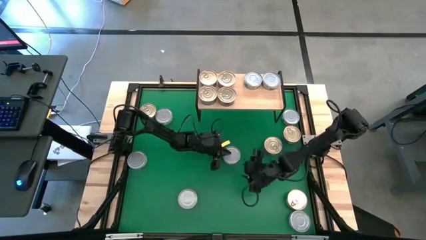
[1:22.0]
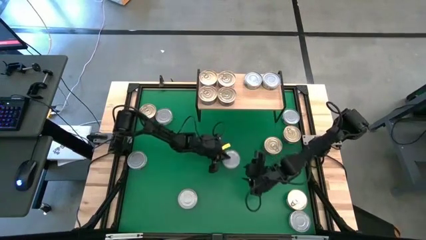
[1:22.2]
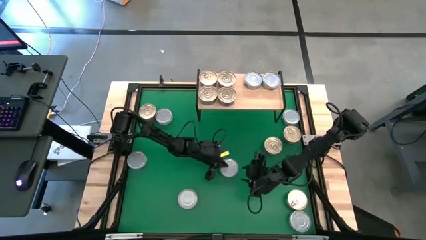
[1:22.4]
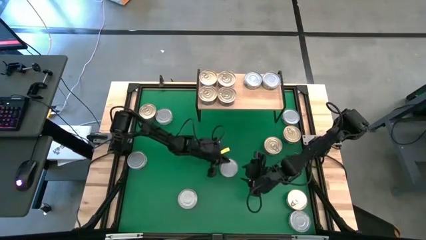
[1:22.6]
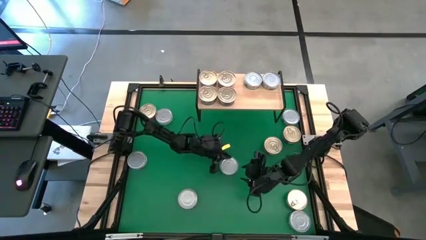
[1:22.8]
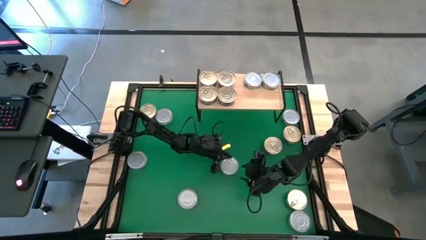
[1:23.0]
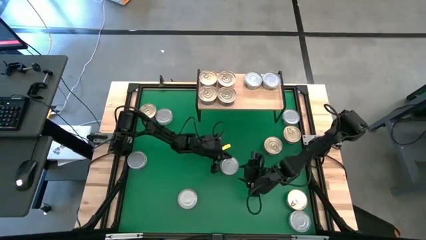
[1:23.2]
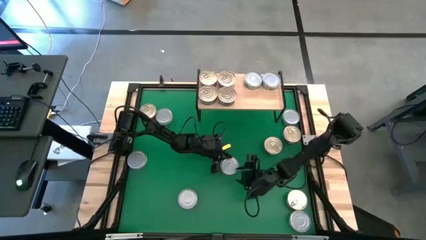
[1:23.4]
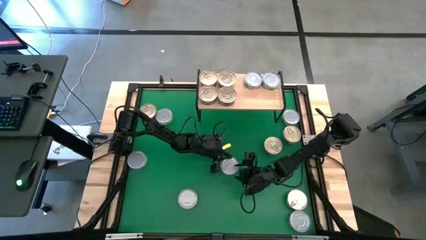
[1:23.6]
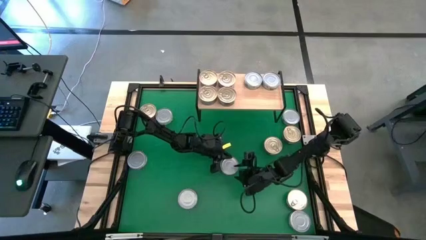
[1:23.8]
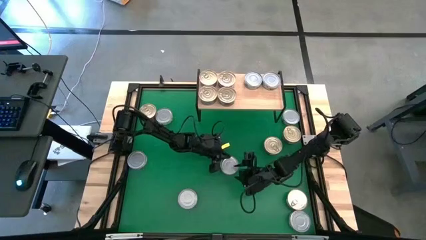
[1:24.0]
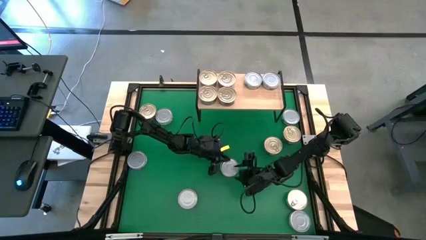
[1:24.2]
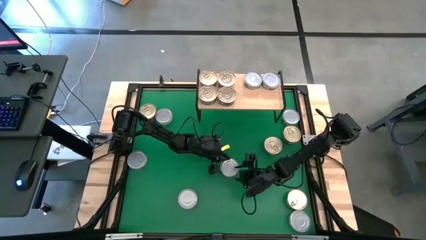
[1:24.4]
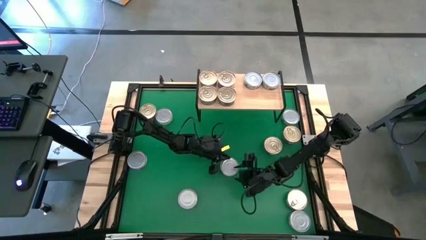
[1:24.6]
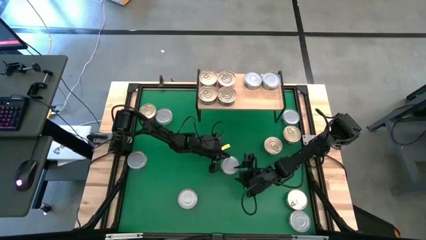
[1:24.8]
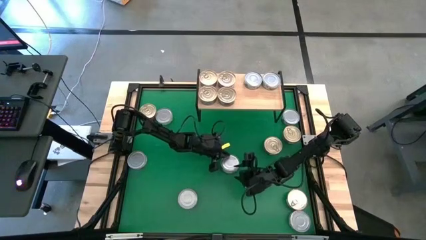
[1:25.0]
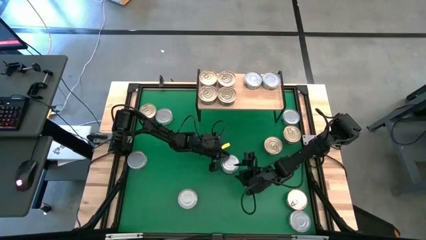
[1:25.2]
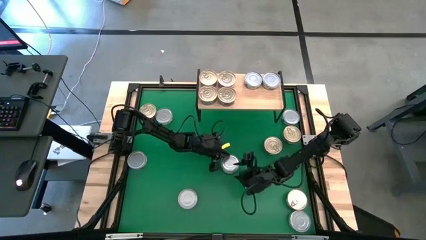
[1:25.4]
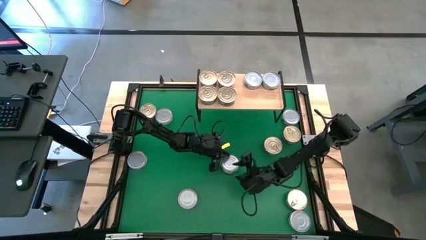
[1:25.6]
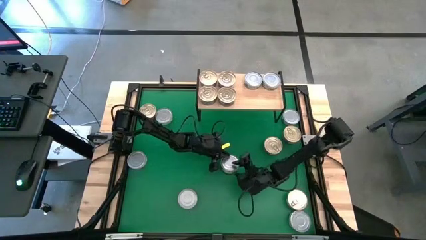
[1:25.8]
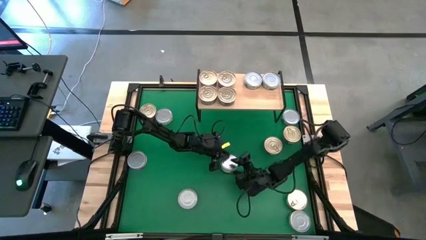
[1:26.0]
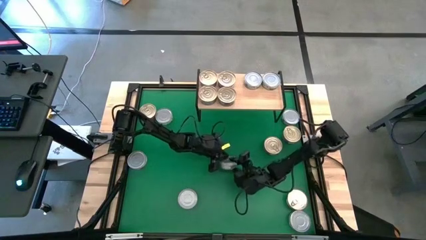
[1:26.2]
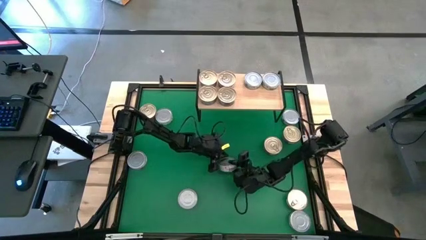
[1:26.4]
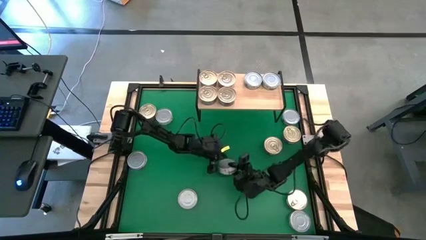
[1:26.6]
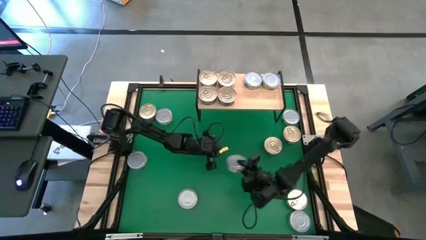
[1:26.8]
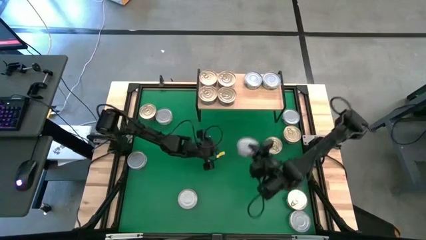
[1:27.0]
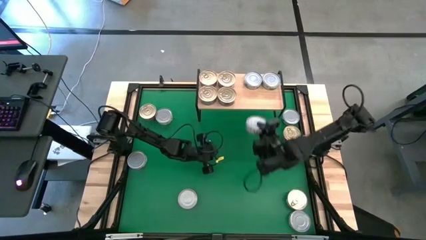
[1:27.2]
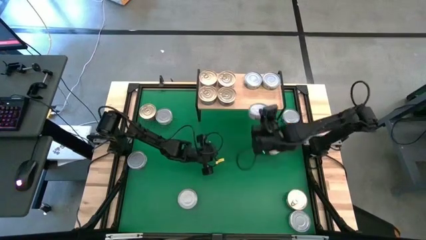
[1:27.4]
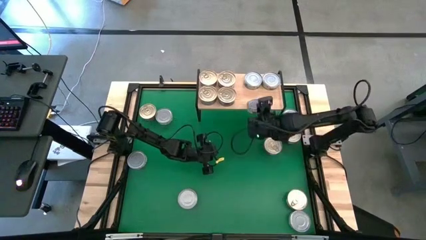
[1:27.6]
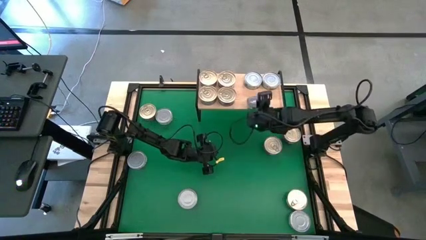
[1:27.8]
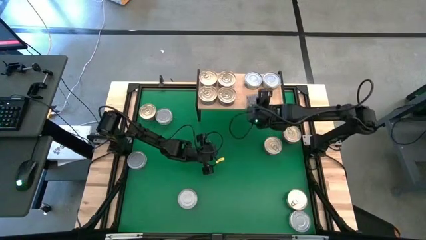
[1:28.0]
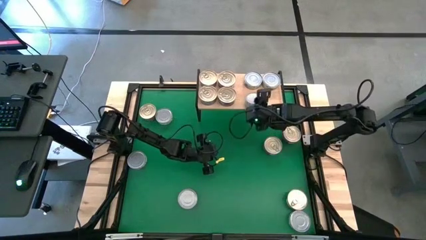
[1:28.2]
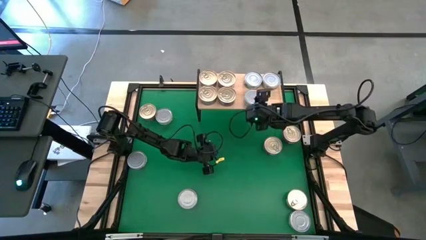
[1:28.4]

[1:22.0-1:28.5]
Task: Stack canned seafood by type on shelf
Put the green tuna can on the shelf

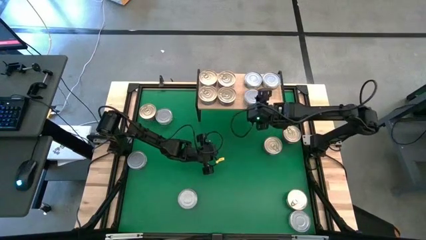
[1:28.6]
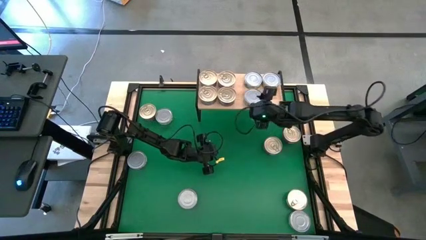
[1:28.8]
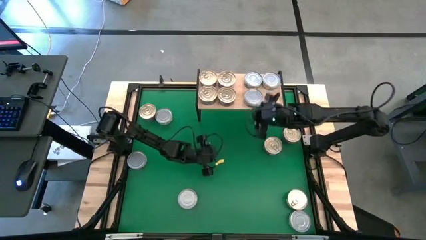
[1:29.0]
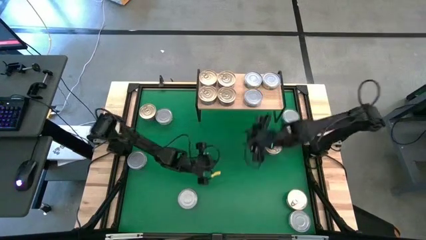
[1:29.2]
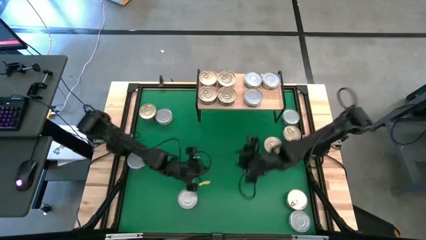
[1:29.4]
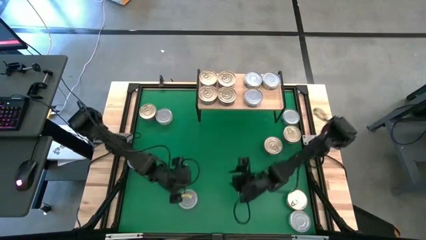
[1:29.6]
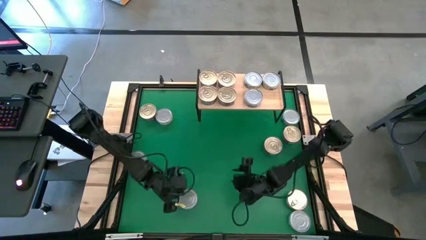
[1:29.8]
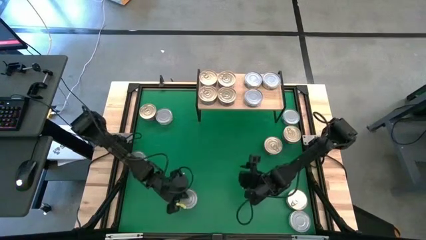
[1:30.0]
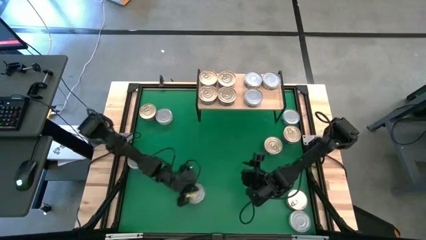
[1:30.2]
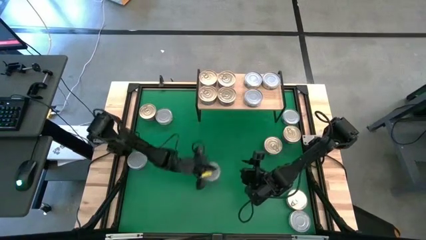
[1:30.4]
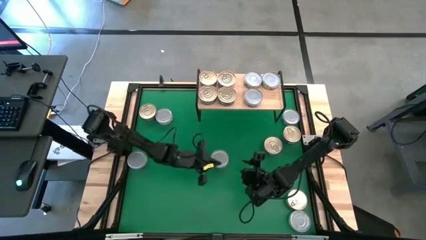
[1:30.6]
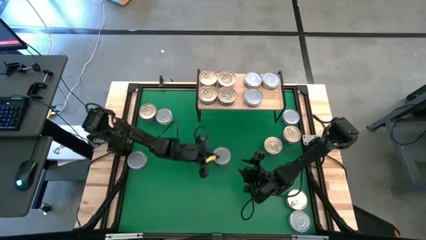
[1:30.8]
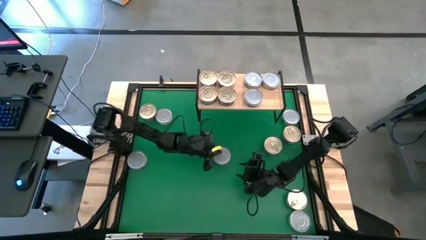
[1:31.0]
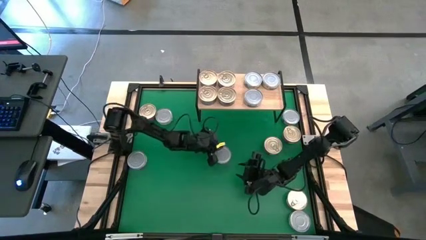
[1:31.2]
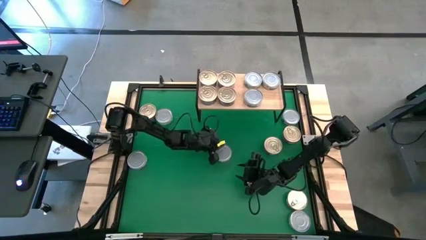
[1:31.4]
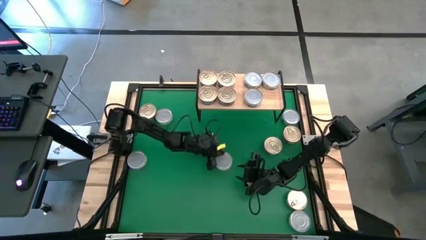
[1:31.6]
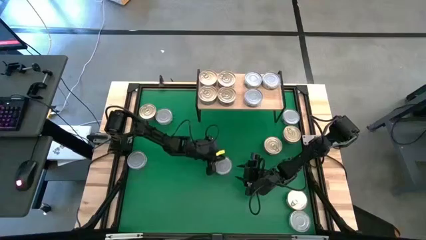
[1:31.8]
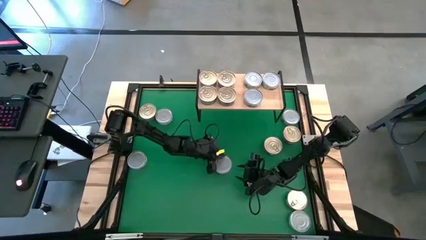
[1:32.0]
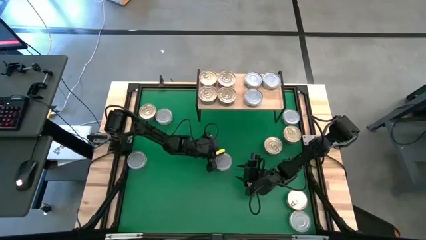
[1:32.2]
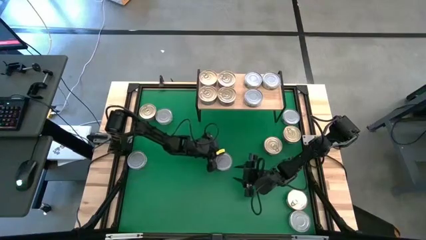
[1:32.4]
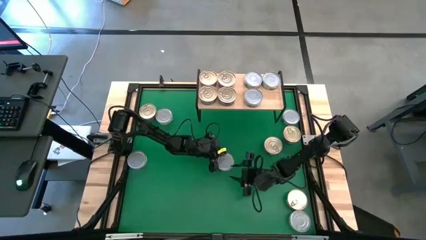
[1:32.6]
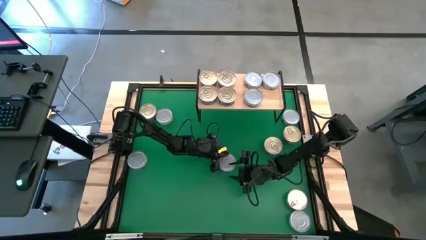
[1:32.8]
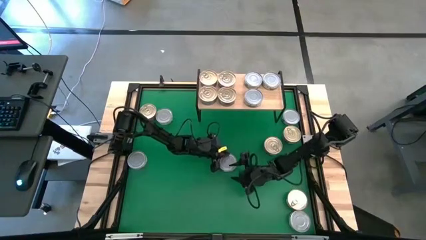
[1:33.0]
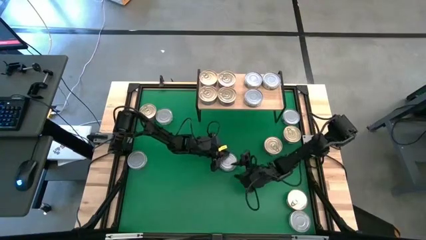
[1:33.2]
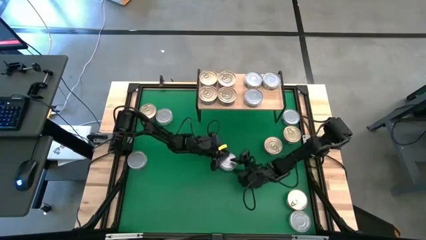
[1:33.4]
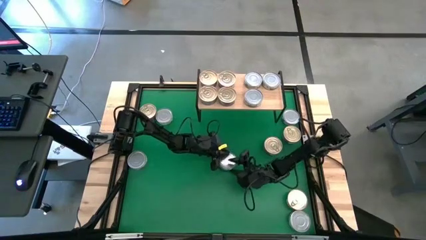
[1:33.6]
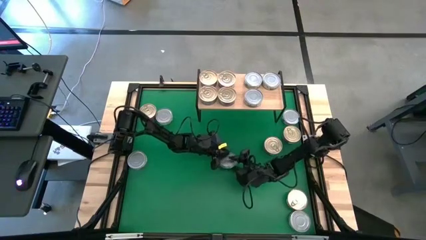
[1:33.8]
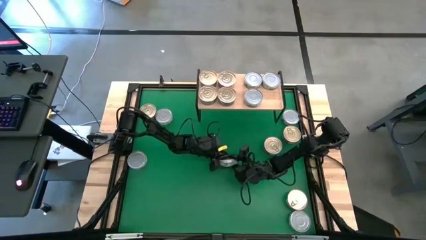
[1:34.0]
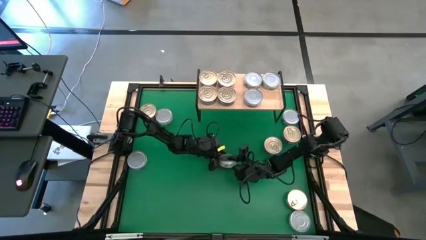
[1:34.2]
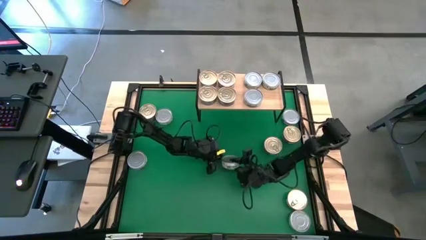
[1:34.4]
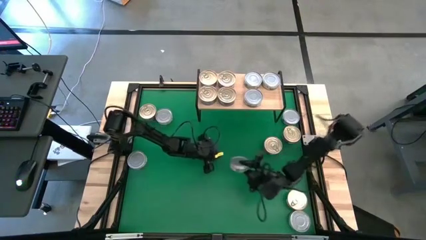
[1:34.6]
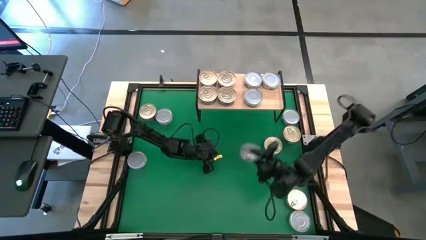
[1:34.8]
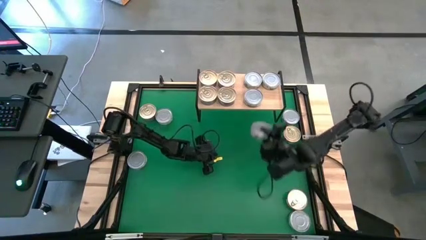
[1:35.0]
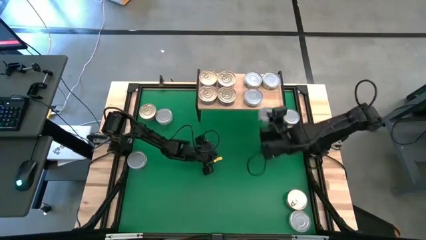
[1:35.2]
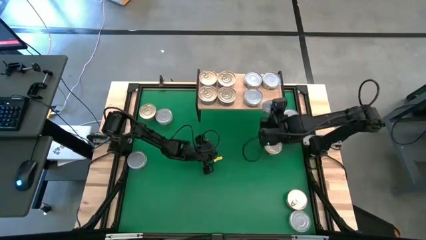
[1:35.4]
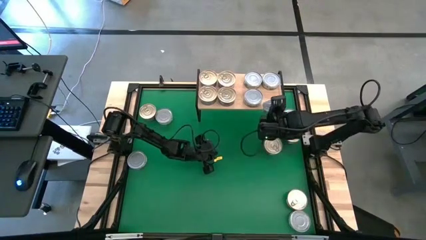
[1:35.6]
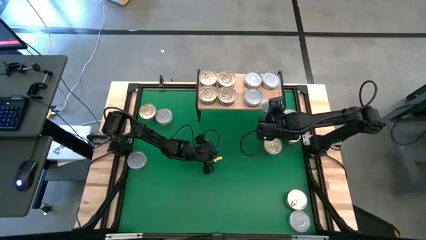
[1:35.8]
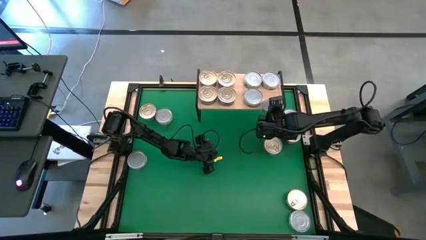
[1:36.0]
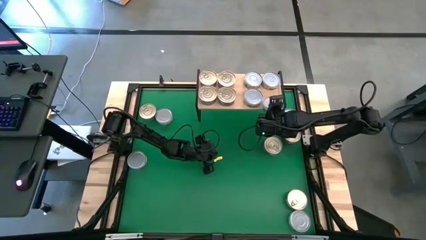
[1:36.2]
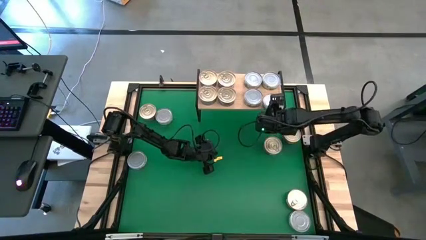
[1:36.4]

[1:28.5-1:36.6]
Put the green tuna can on the shelf

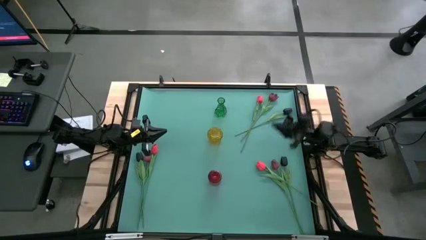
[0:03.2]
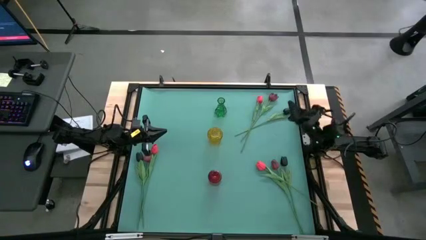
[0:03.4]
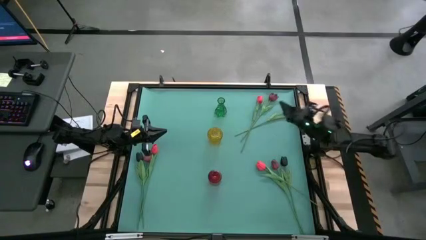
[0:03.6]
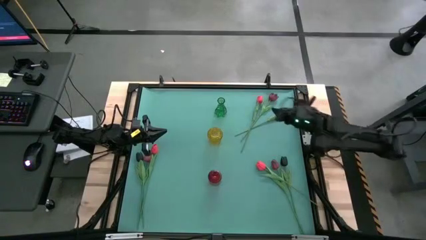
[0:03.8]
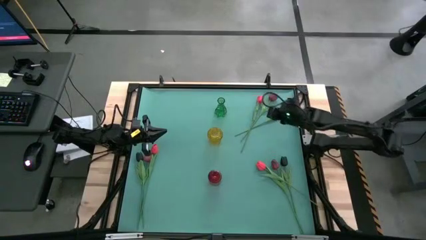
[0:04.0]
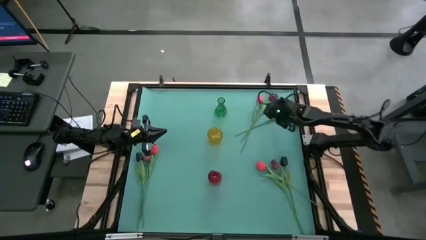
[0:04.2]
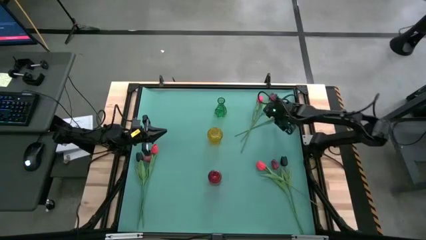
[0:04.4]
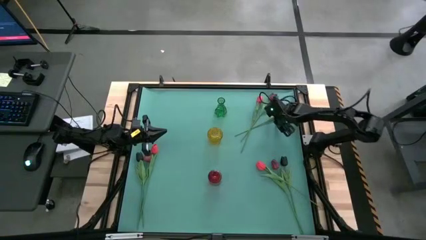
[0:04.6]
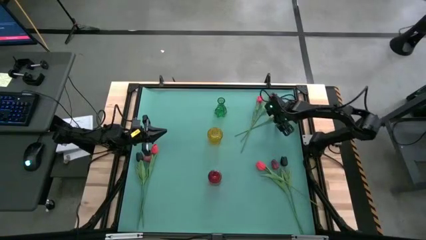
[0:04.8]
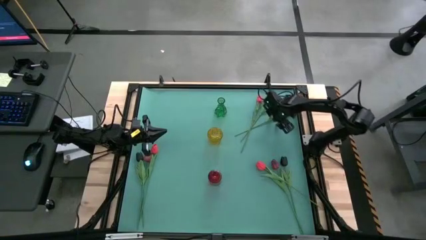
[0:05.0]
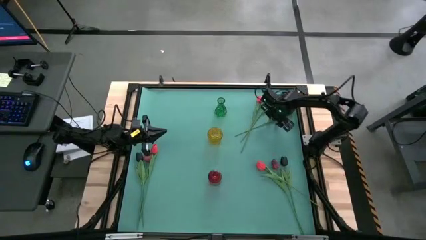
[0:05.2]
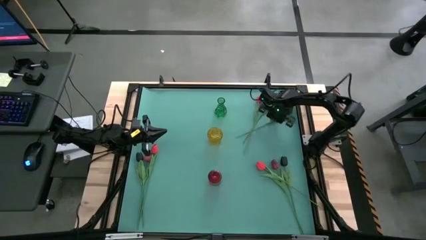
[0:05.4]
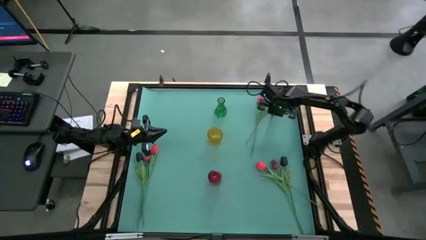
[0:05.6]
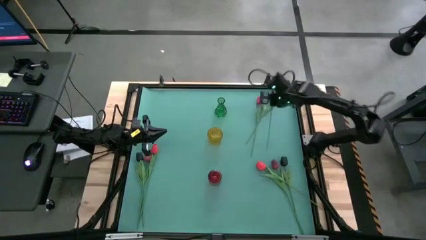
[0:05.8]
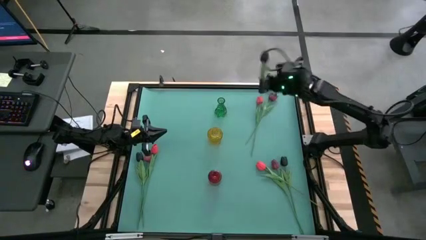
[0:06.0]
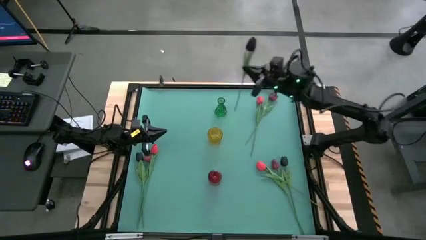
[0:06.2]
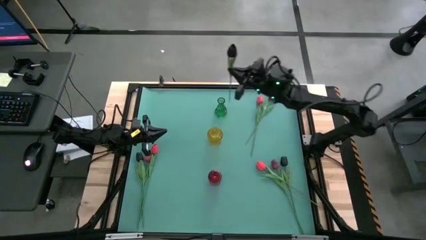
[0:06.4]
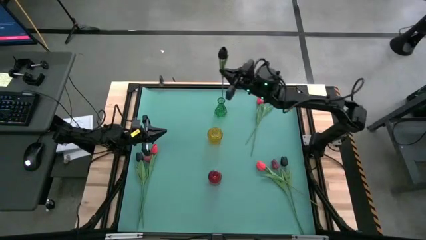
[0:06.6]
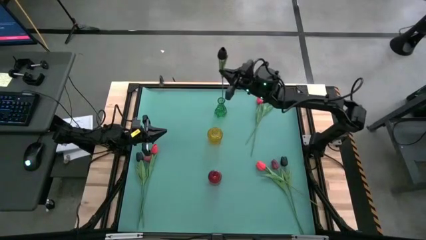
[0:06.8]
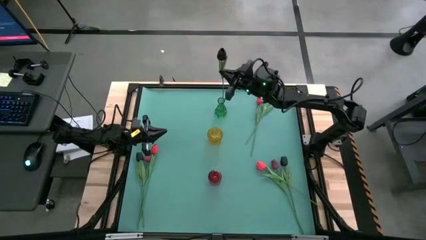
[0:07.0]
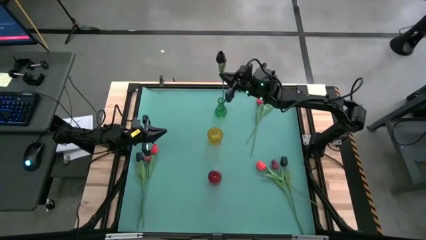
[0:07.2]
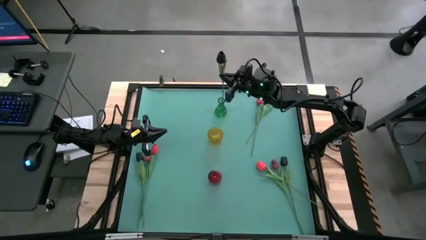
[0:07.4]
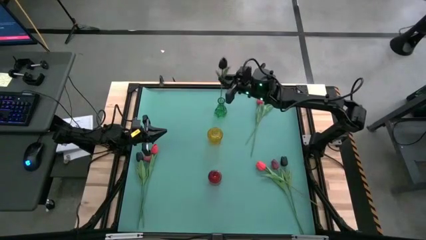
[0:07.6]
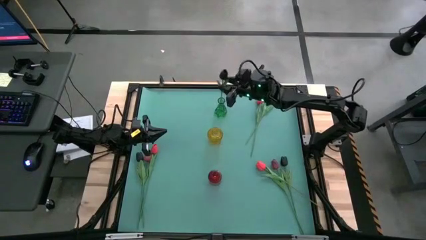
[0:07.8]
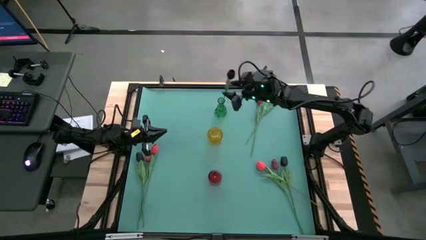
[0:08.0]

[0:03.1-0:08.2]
Task: Sort flowers into vase by color
Put the top black tulip into the green vase
